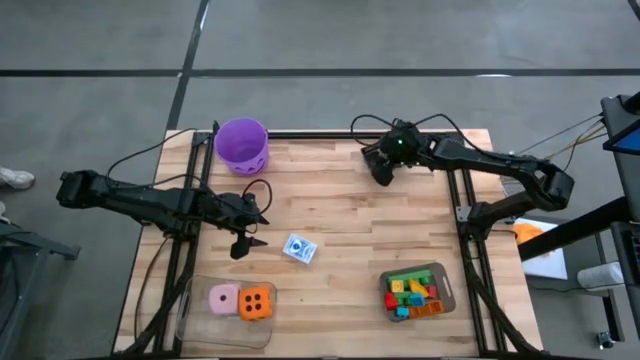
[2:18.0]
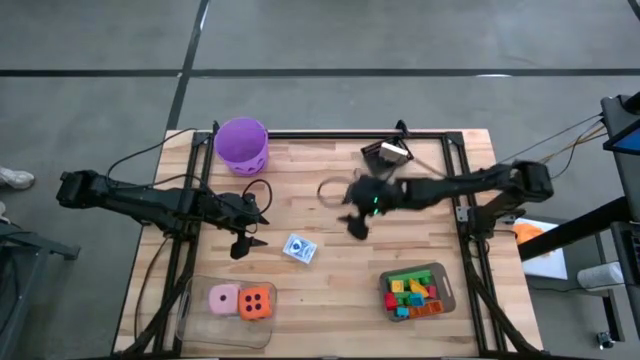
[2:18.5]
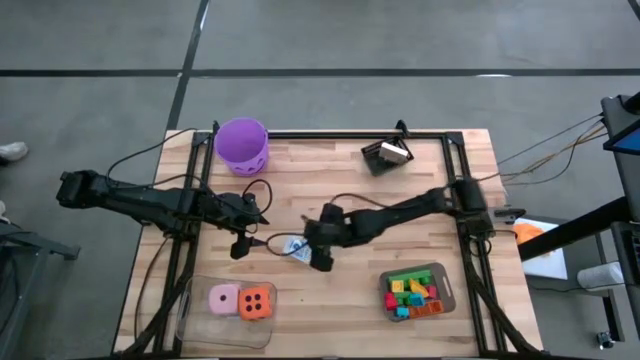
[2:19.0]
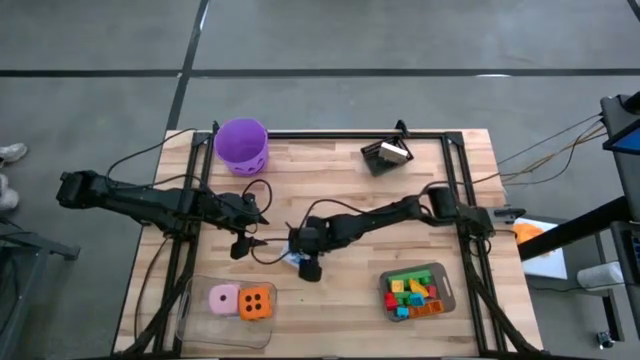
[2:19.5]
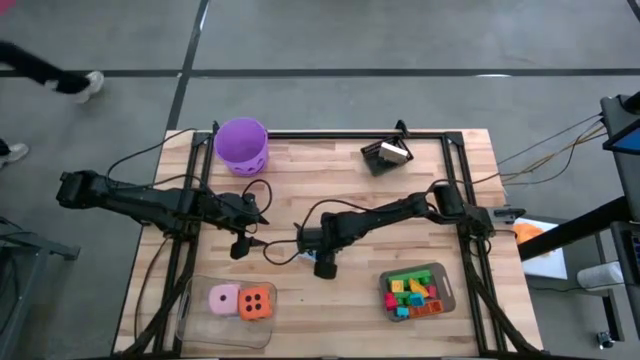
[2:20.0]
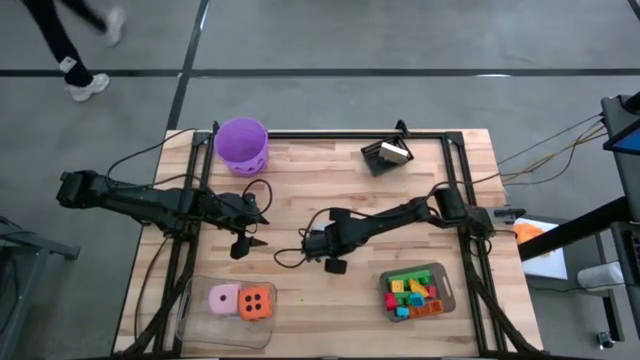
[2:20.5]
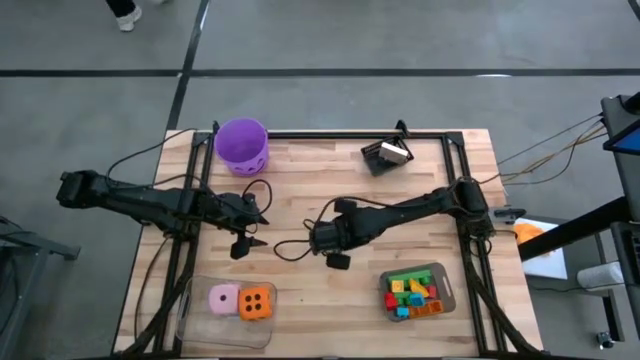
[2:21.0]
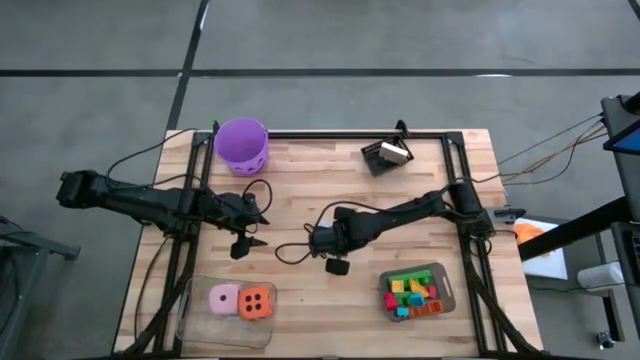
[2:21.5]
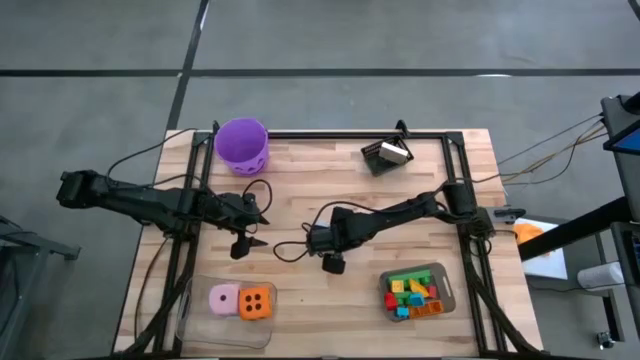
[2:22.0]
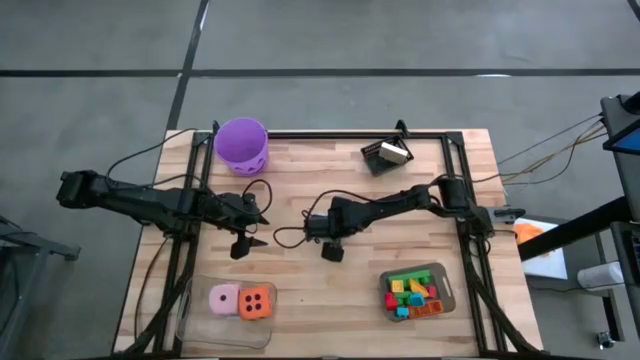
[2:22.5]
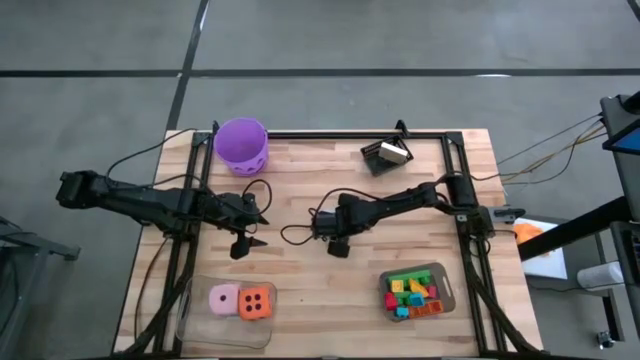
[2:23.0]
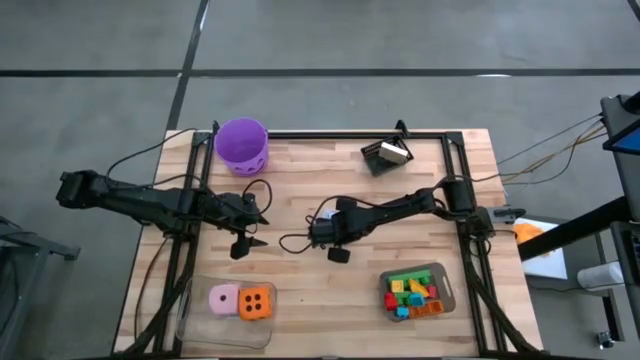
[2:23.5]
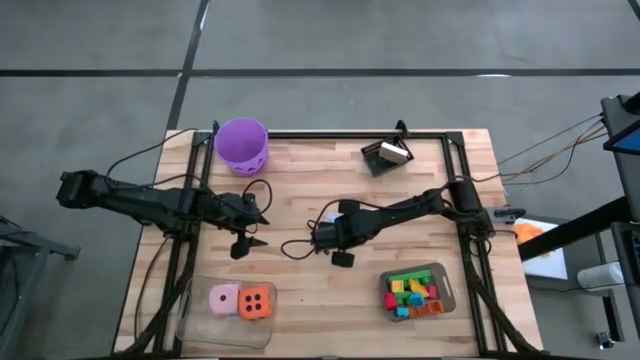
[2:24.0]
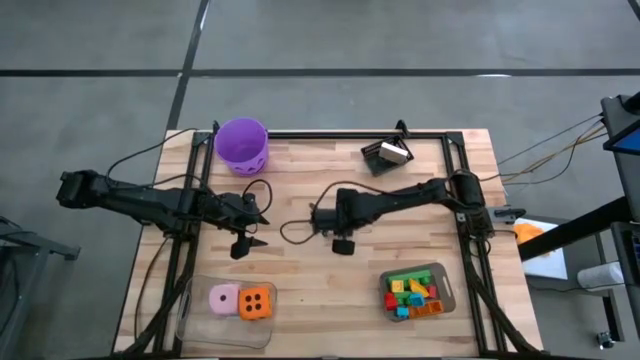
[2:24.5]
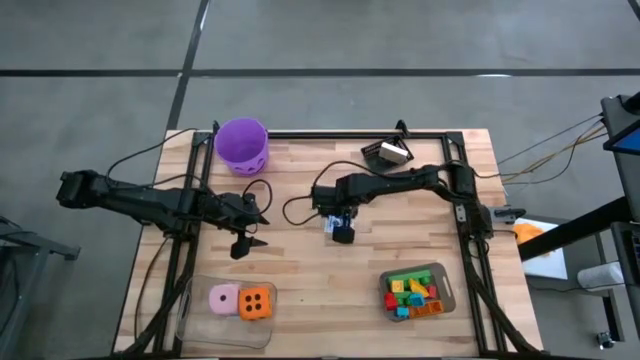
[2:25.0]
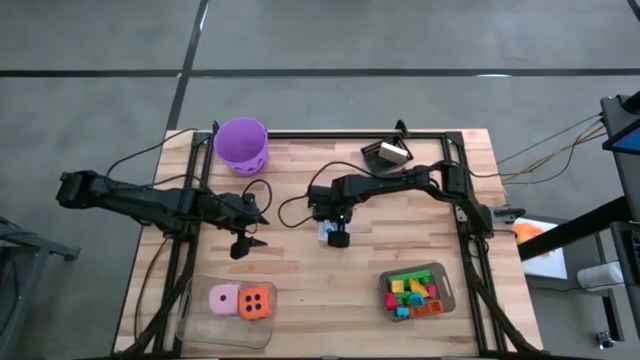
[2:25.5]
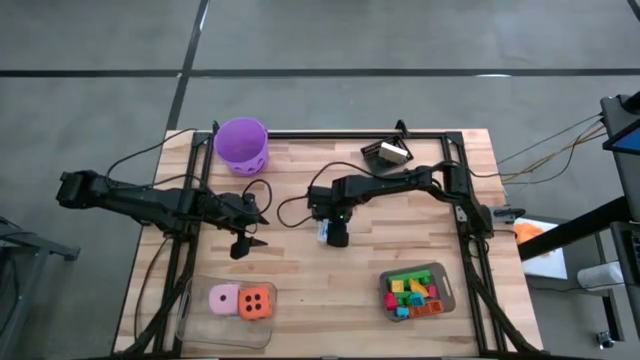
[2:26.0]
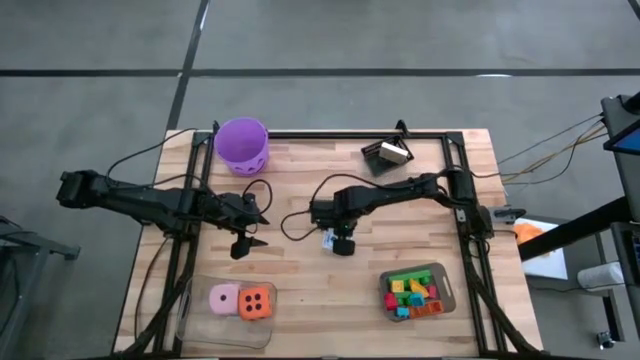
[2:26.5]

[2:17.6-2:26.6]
Task: Pick & Place Toys
Put the blue playing card into the basket bin

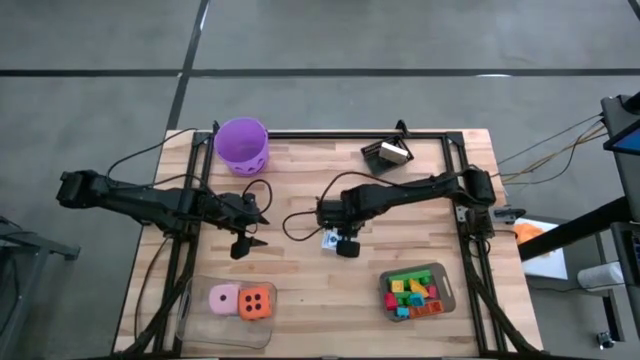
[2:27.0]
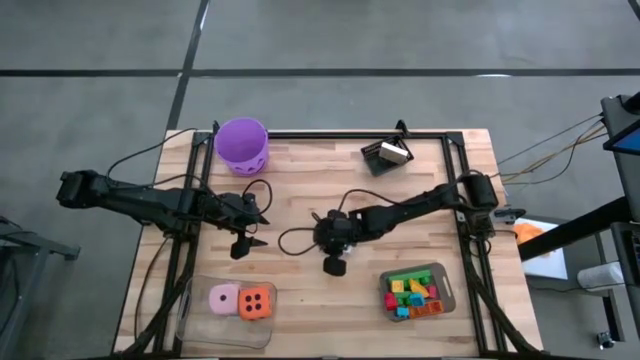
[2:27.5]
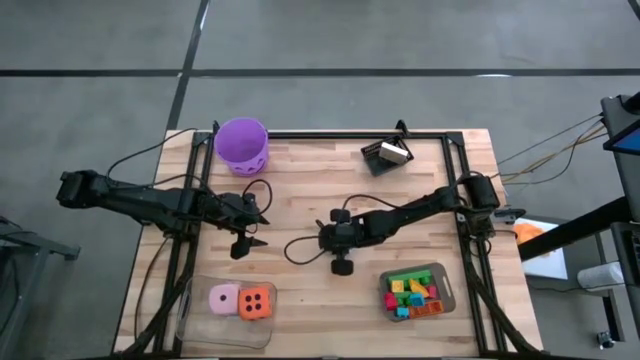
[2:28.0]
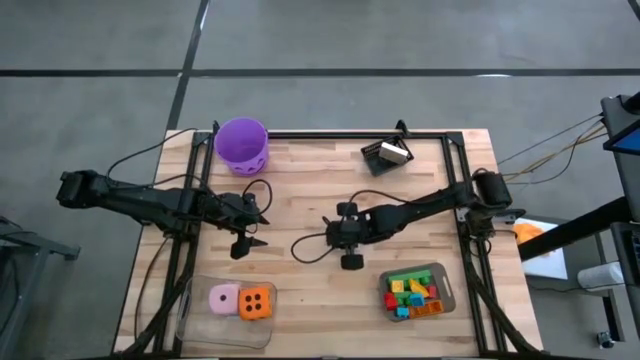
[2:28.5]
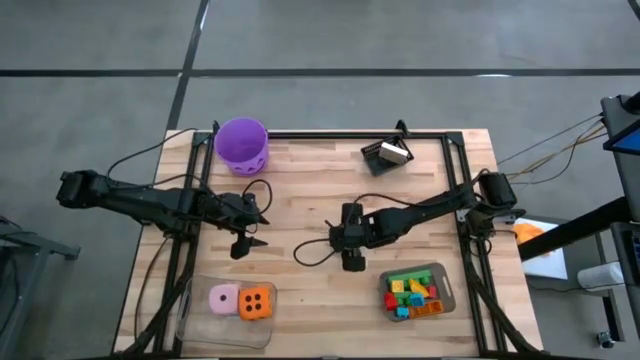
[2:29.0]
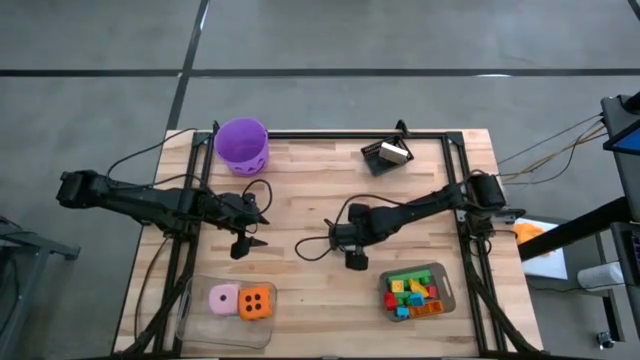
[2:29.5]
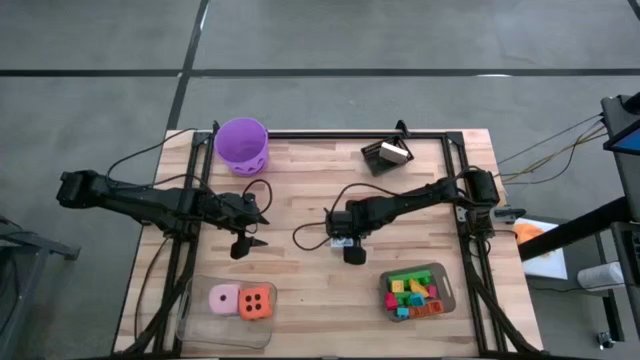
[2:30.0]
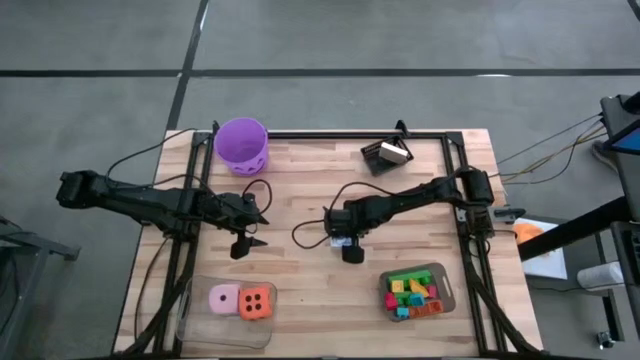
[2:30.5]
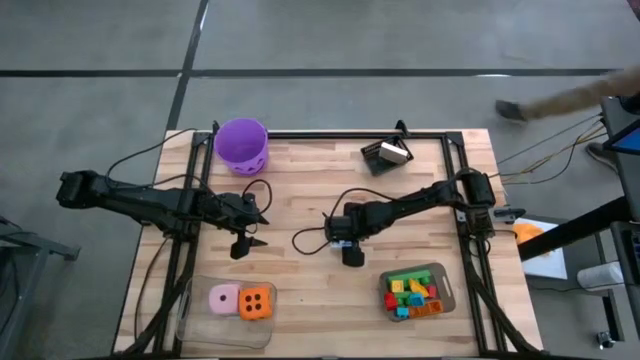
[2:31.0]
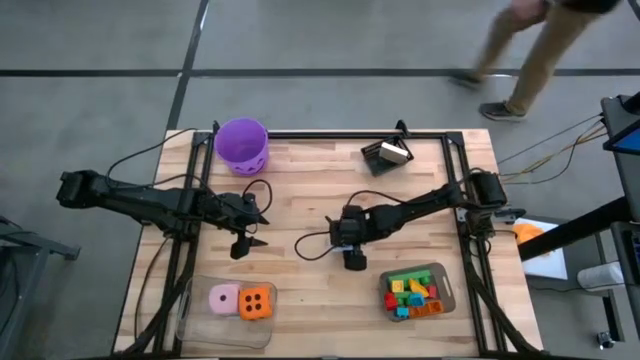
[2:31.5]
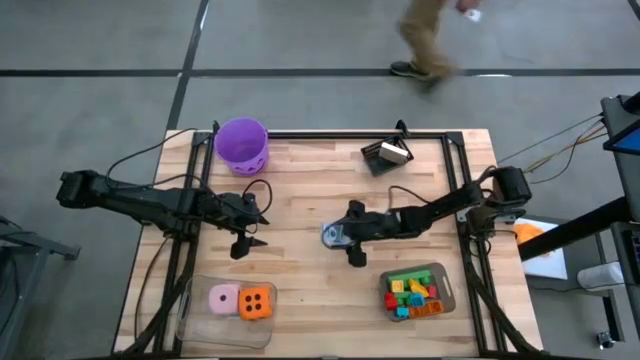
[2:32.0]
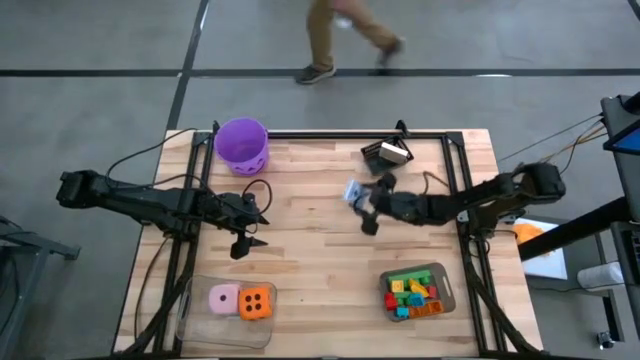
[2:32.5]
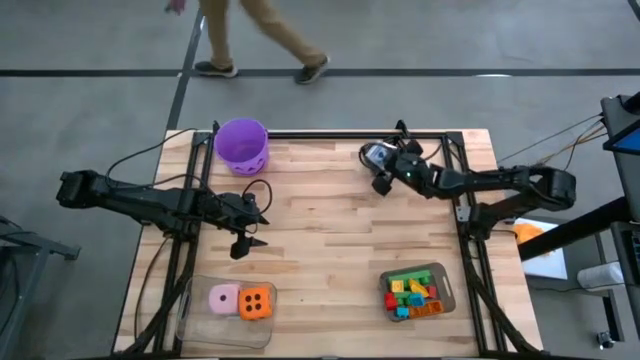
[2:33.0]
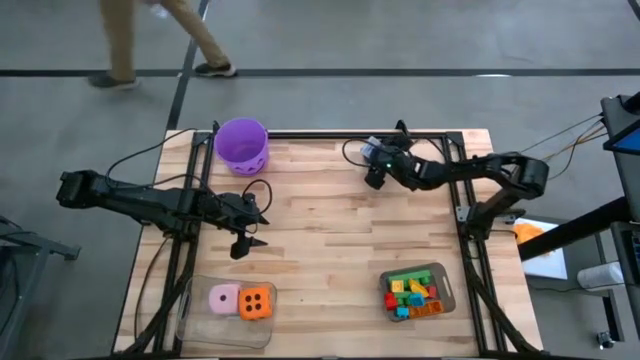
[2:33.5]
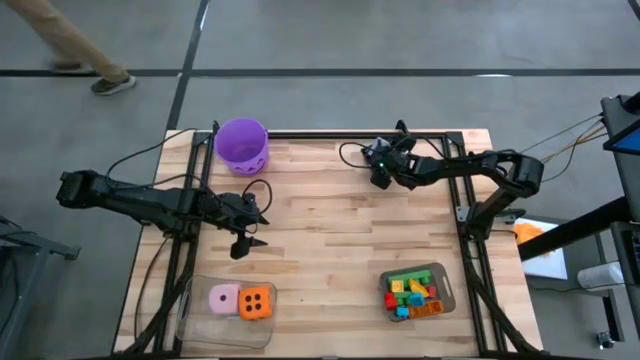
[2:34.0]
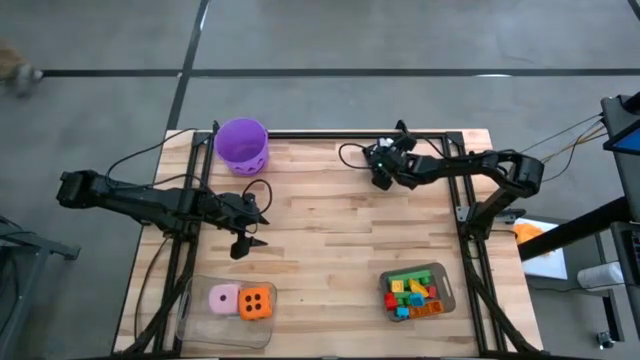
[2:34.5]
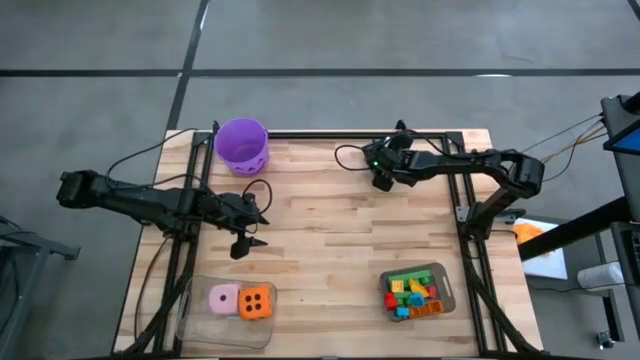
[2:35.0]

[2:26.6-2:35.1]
Put the blue playing card into the basket bin
